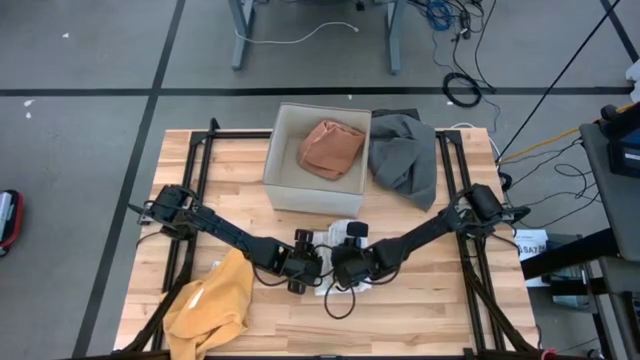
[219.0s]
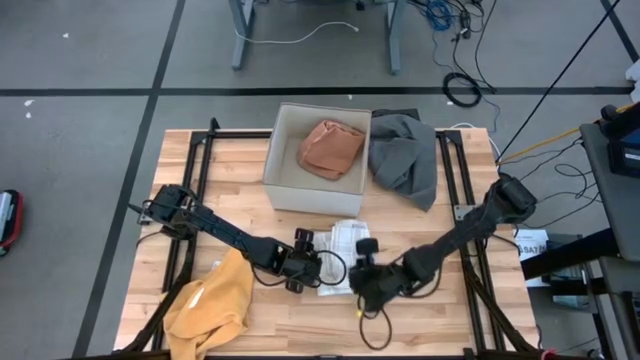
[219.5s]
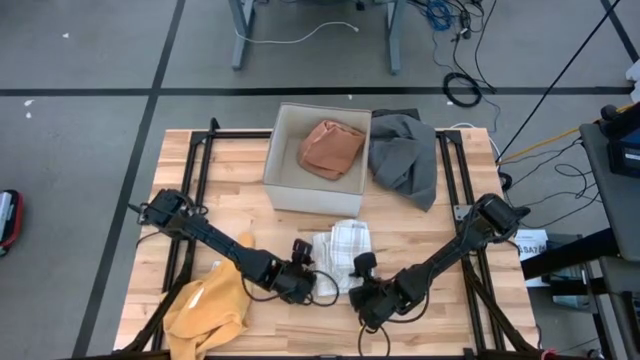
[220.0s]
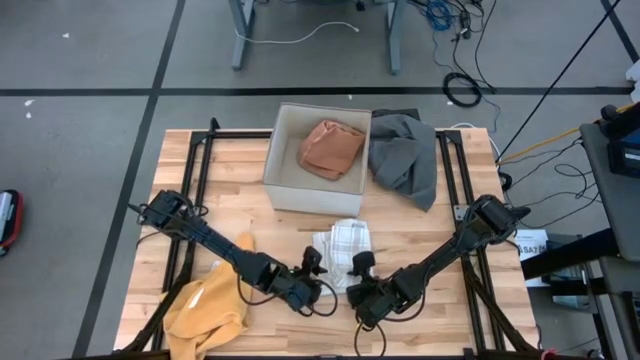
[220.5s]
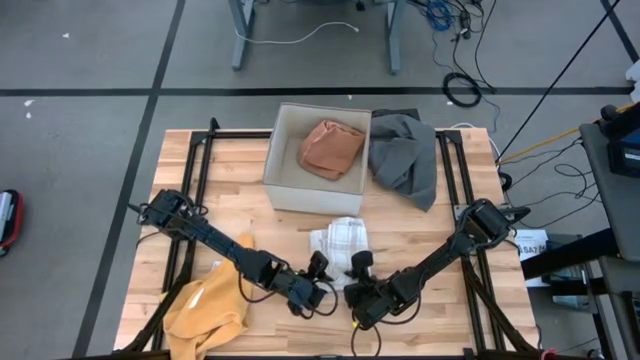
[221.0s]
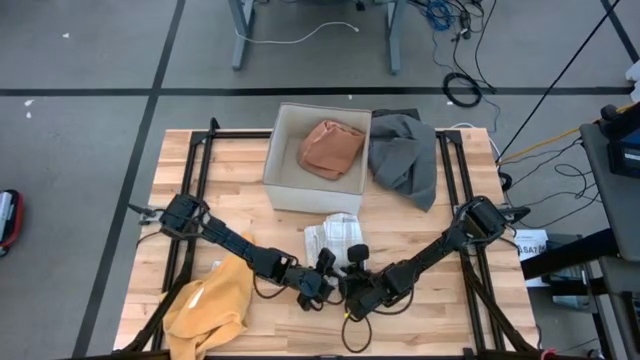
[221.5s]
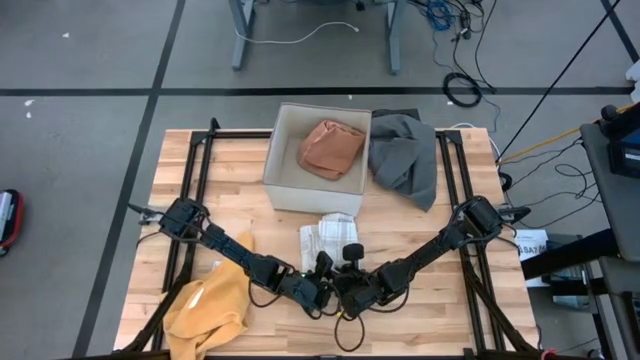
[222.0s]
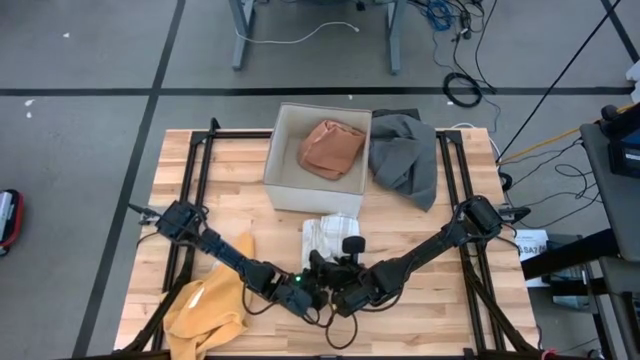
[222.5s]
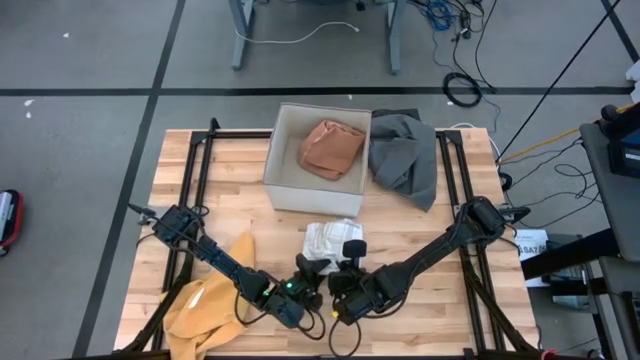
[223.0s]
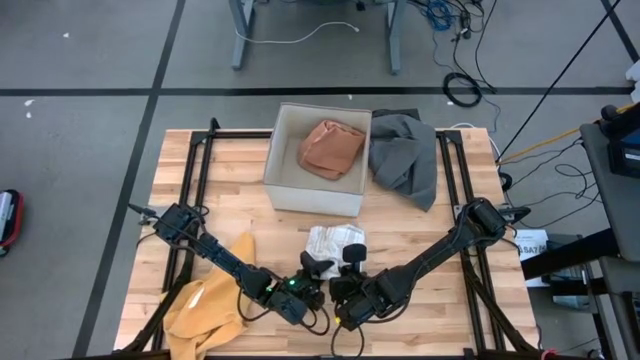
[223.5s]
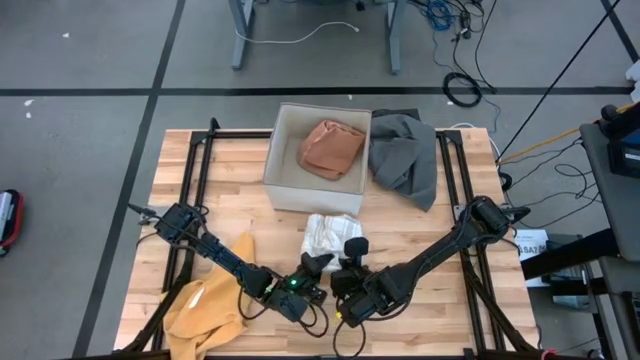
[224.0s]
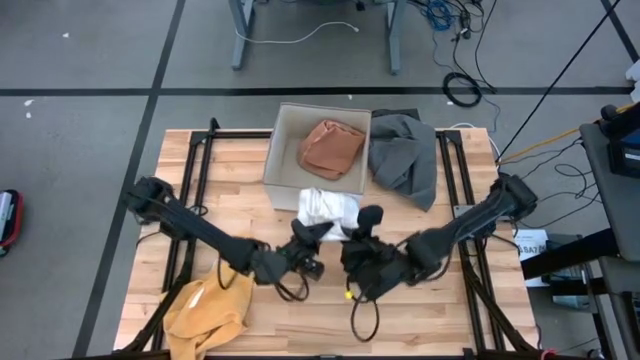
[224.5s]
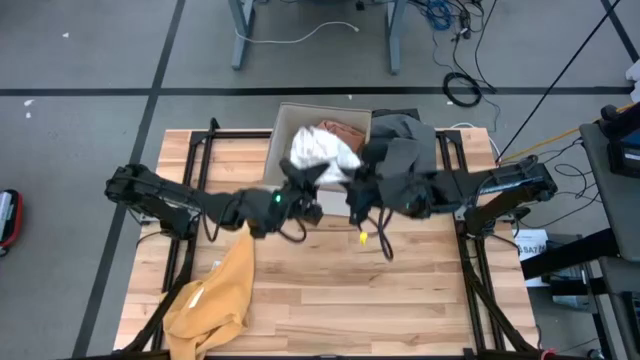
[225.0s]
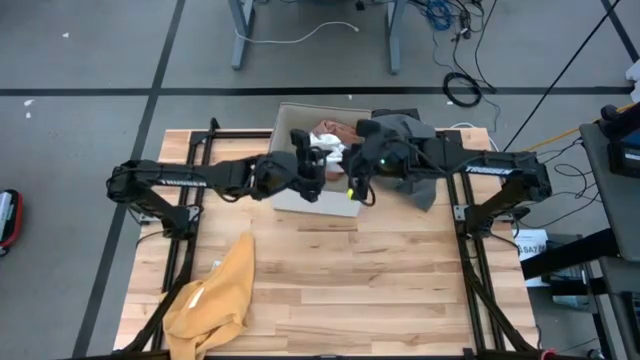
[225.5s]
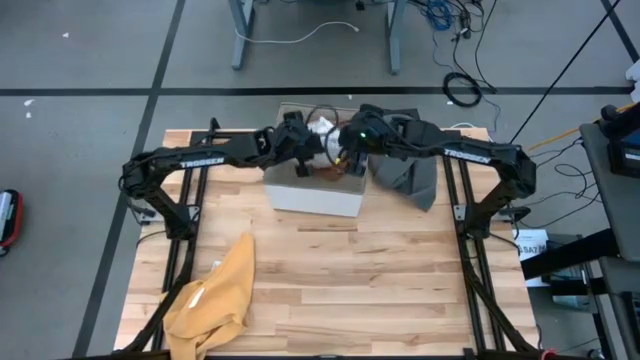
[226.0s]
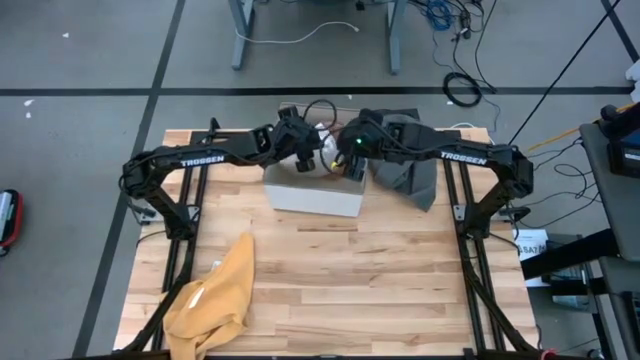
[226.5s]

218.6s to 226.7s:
Task: Fold towel
Put the folded white towel into the laundry bin
